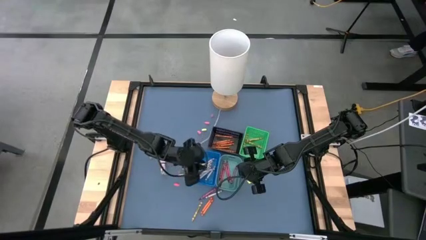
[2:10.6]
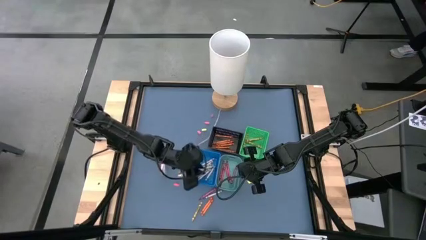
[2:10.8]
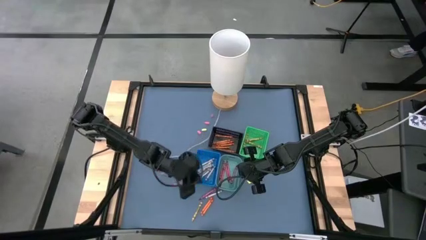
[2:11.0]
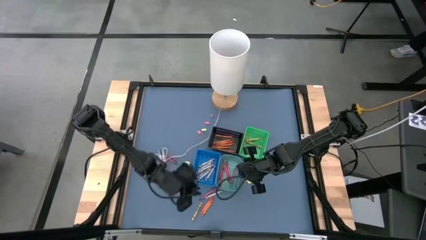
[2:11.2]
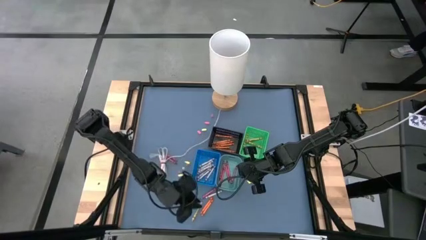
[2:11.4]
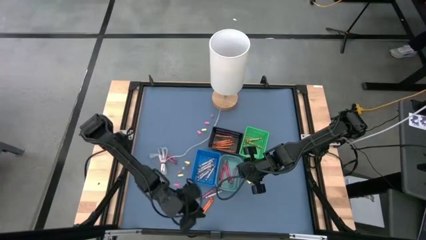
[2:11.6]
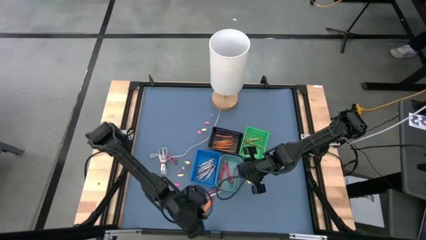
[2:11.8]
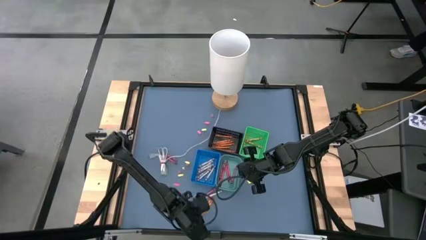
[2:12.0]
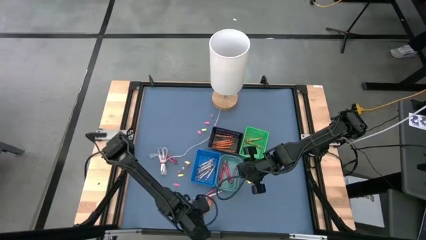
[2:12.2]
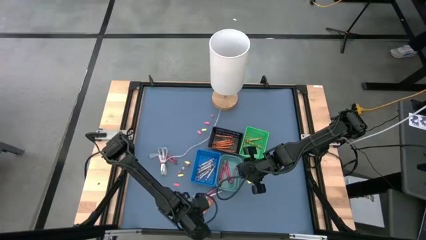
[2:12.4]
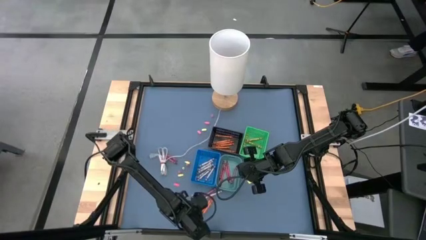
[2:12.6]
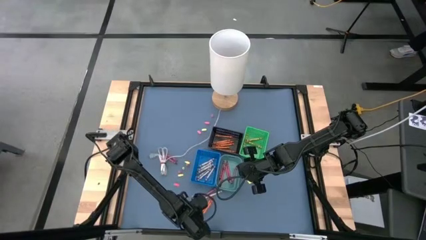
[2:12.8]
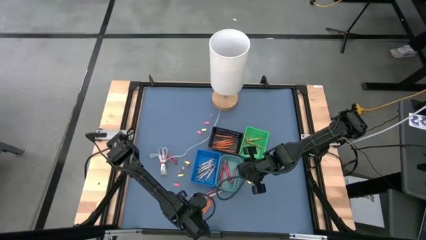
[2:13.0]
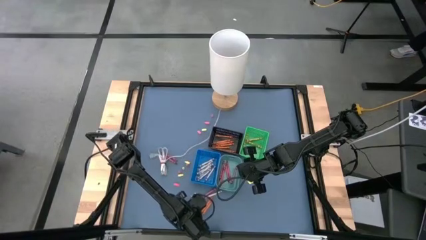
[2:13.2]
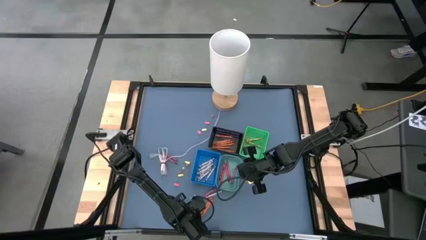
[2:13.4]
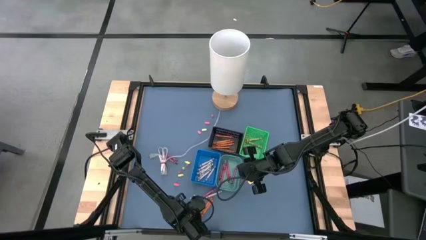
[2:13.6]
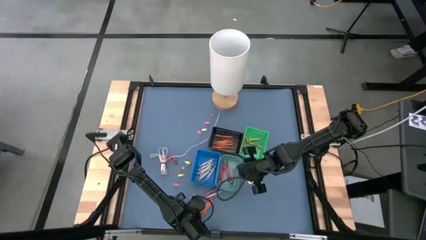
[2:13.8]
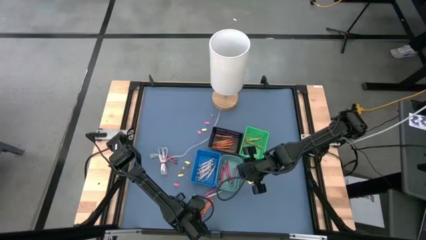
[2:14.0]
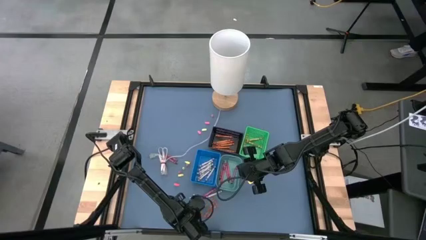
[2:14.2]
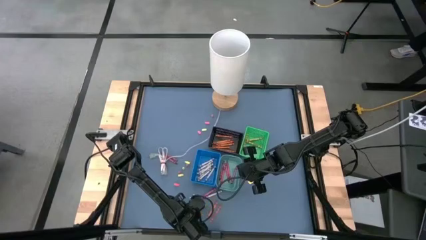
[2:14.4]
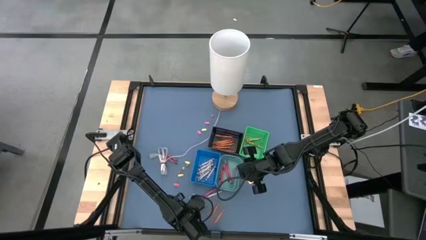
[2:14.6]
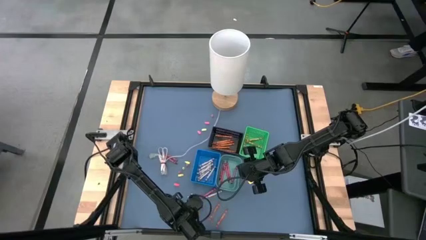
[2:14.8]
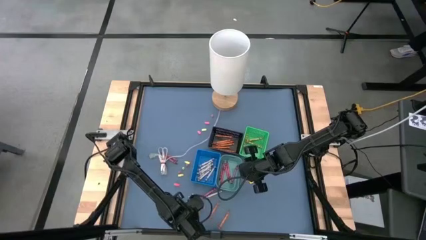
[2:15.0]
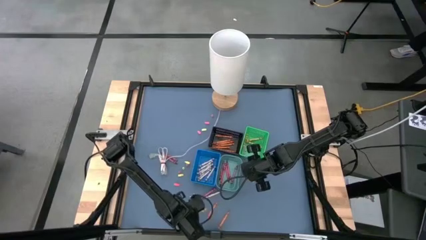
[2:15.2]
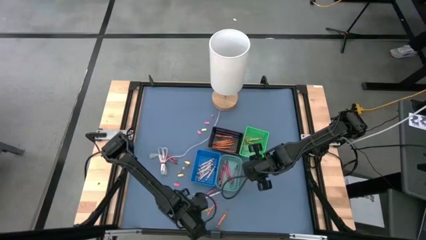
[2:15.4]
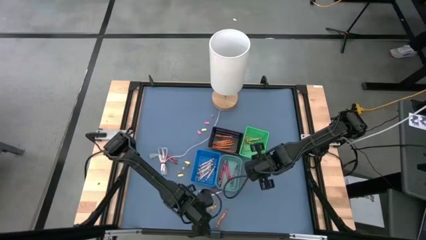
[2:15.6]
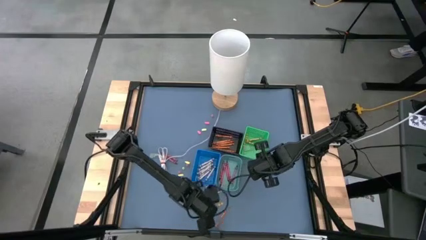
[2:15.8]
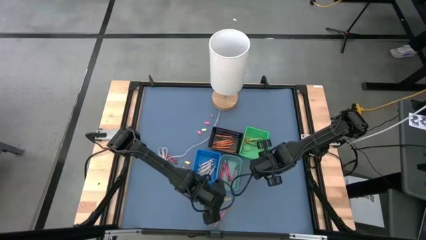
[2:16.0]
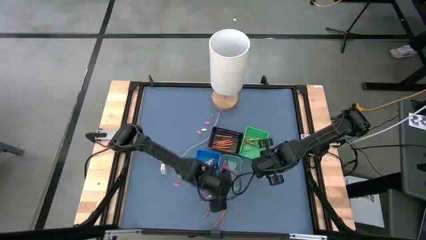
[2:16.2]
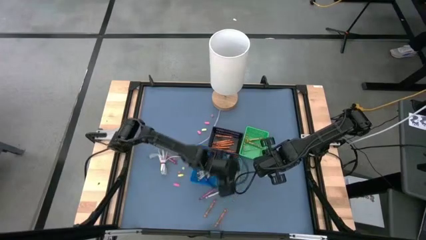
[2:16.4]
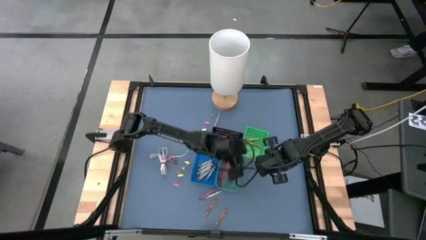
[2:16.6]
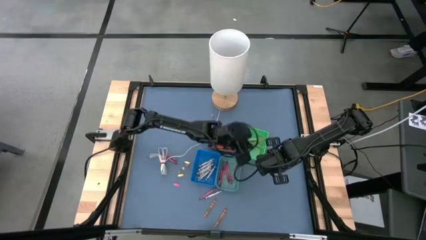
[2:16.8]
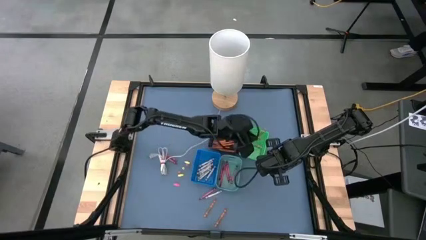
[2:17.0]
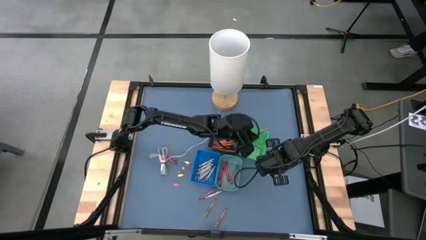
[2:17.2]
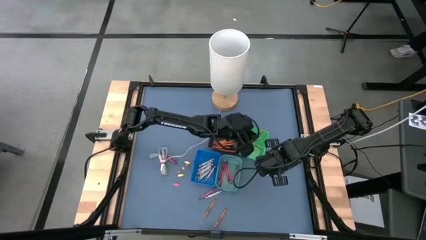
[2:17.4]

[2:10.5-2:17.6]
Task: Sort crayons
Put the yellow crayon into the green bin

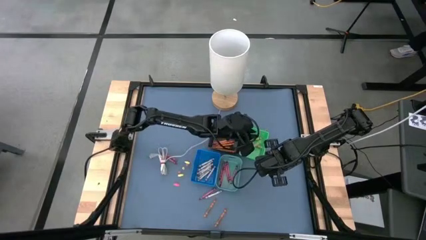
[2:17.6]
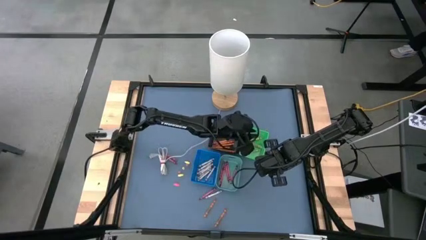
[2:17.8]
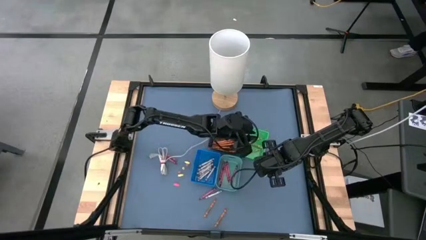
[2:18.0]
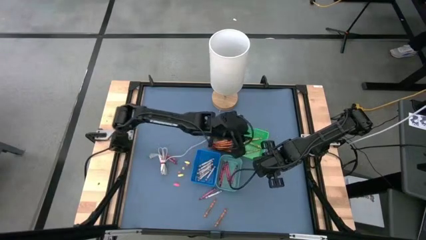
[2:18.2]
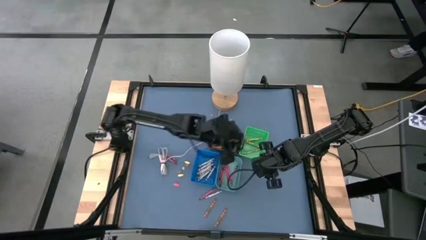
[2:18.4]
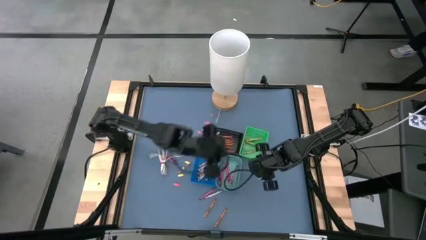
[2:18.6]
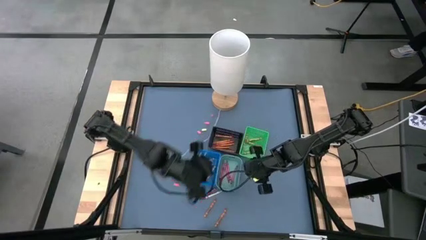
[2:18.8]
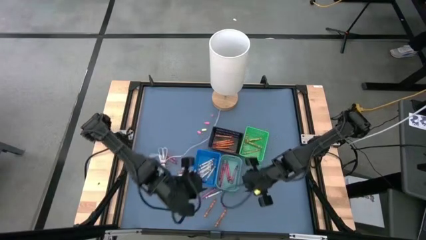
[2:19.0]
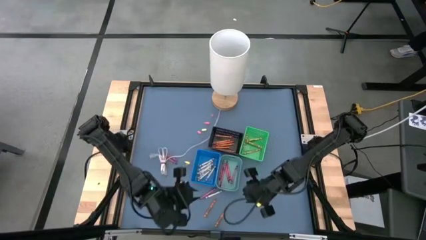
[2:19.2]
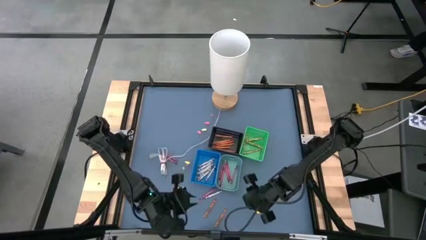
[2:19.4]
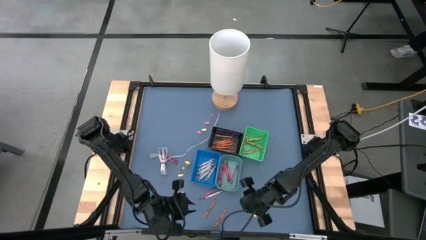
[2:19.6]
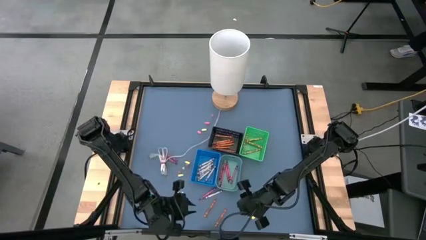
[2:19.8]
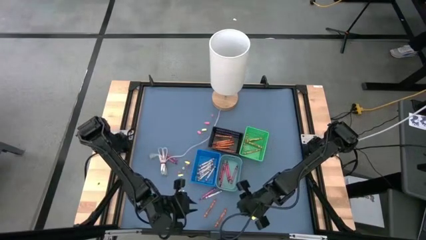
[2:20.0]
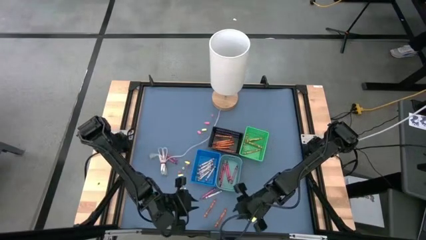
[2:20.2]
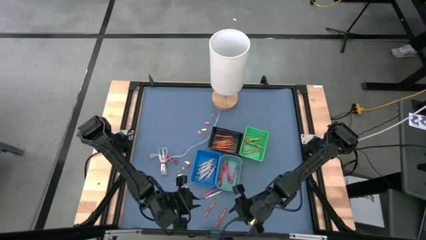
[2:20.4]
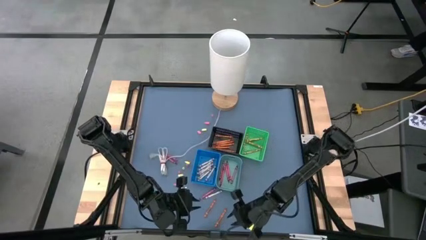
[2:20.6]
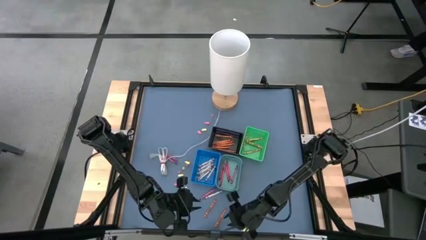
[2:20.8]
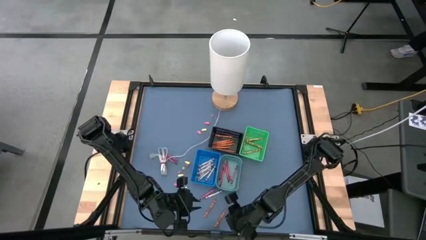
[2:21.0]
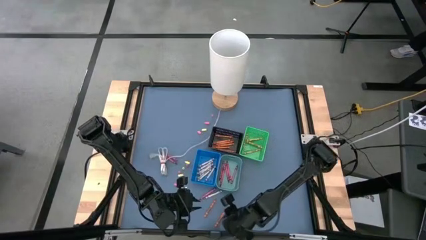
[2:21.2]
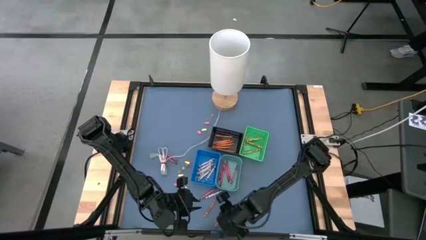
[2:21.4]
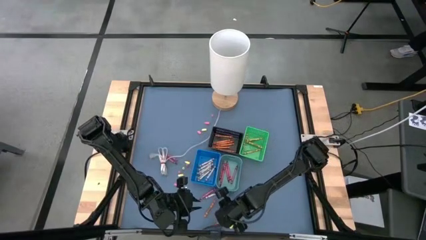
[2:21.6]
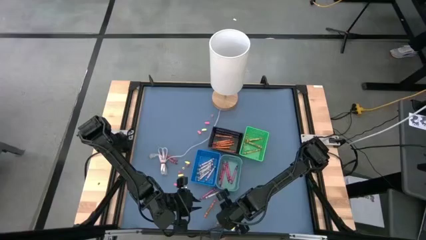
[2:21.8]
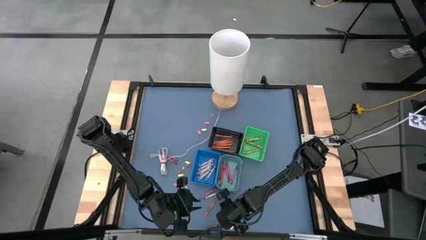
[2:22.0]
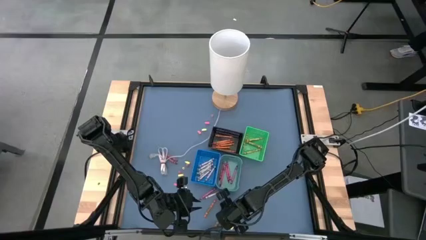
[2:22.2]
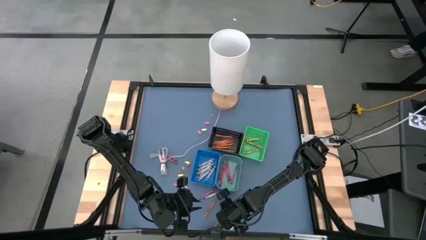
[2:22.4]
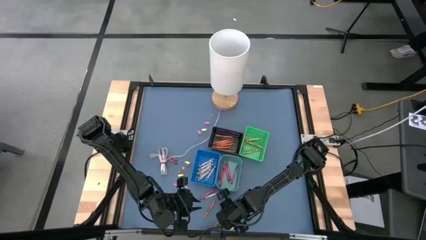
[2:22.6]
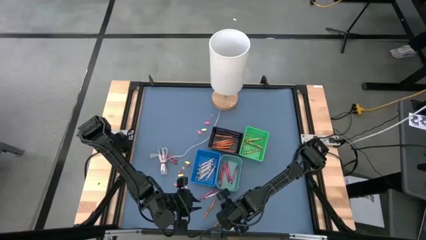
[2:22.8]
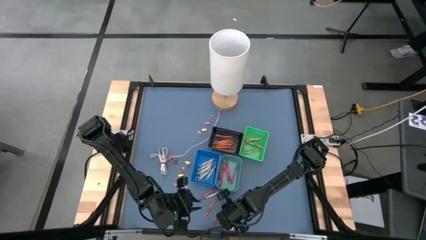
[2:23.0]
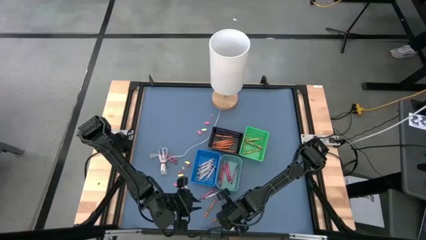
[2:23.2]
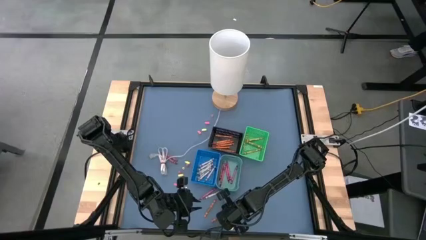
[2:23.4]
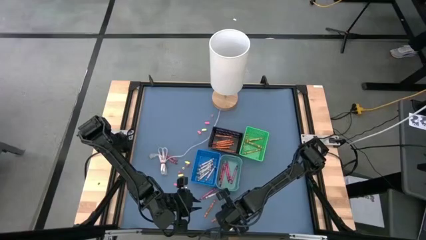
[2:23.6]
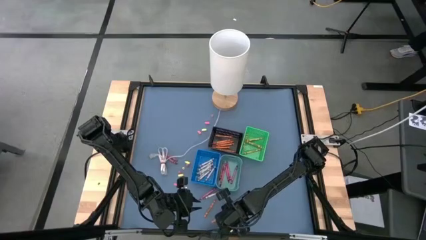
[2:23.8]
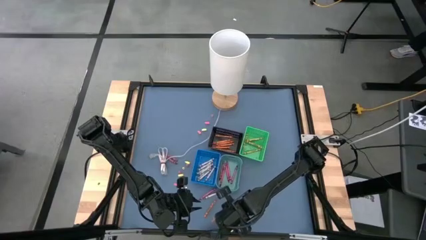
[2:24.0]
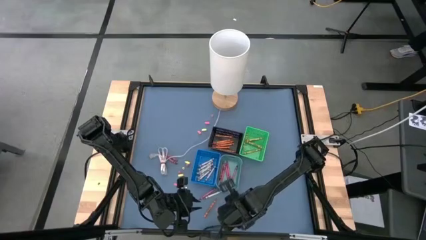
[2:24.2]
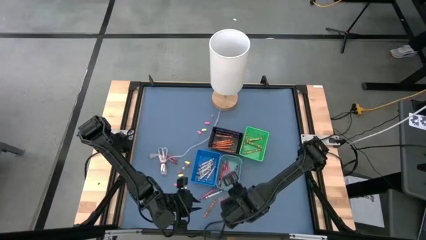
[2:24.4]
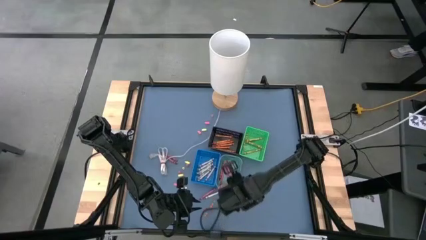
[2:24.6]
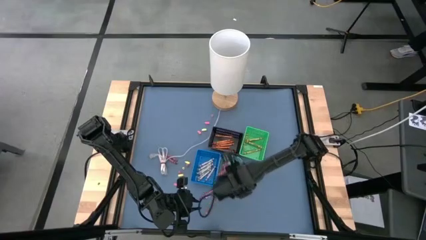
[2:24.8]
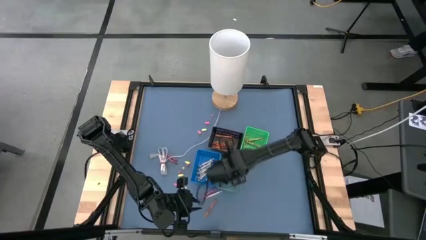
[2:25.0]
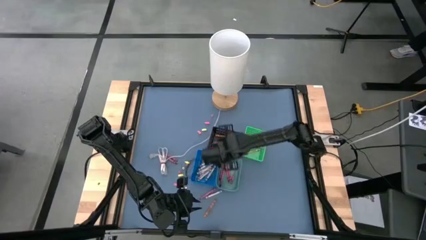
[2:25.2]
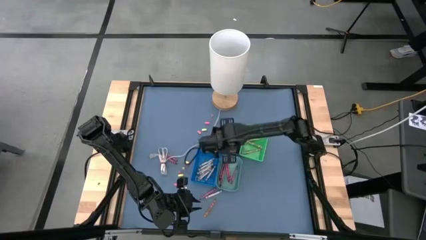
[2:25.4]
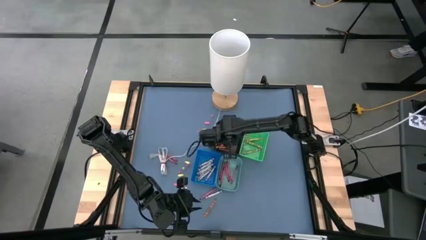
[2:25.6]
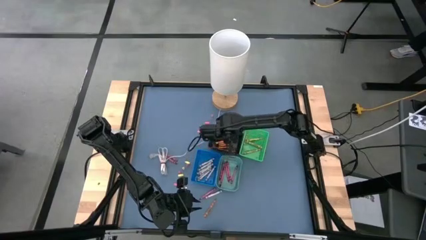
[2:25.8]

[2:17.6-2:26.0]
Put the orange crayon into the black bin
